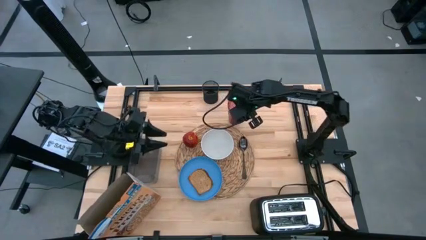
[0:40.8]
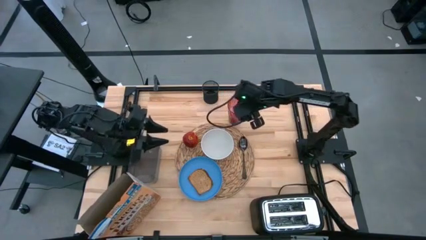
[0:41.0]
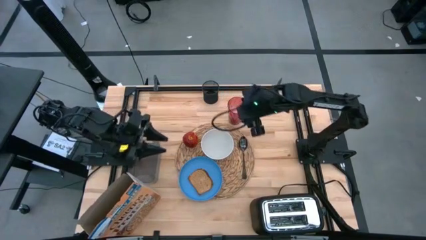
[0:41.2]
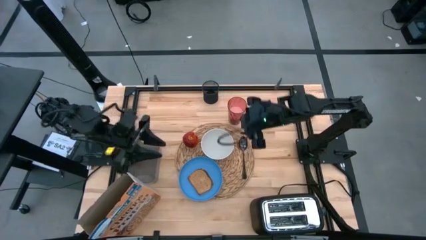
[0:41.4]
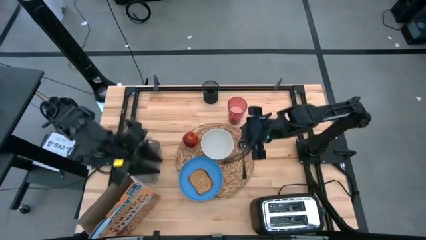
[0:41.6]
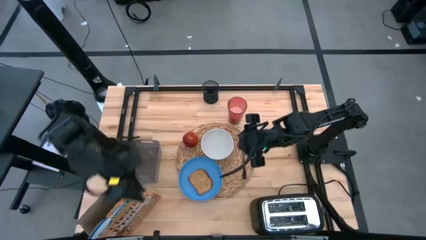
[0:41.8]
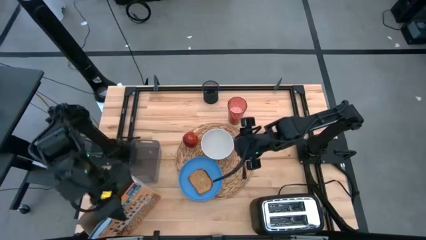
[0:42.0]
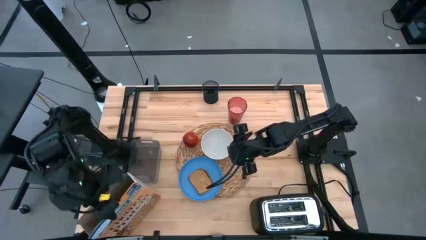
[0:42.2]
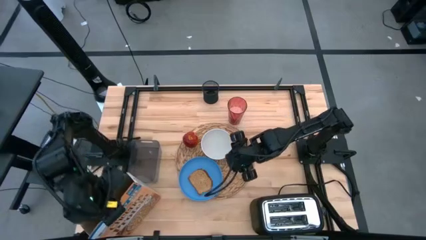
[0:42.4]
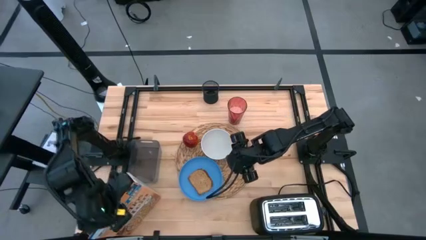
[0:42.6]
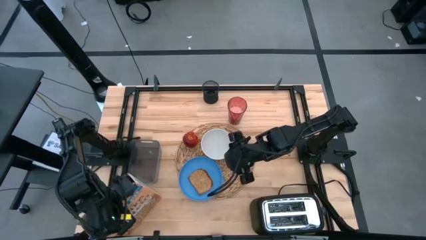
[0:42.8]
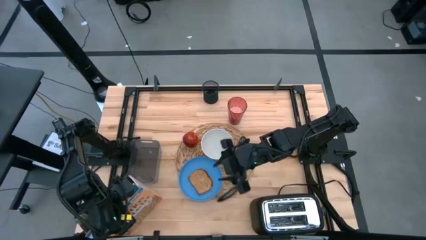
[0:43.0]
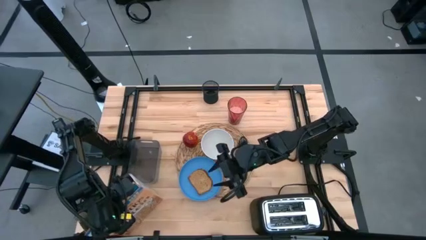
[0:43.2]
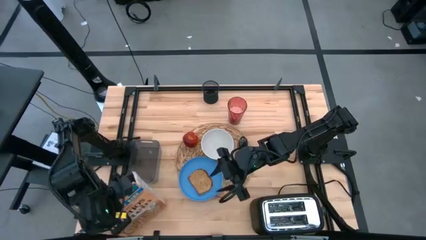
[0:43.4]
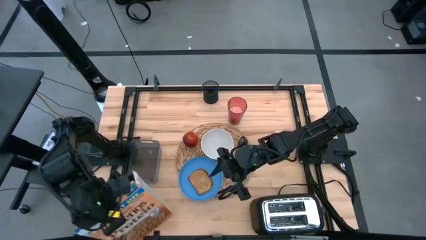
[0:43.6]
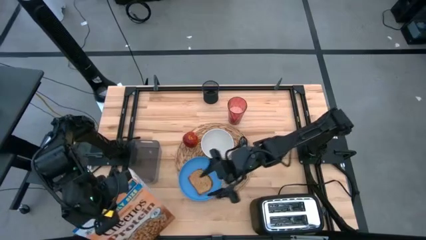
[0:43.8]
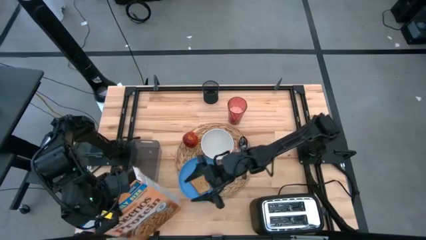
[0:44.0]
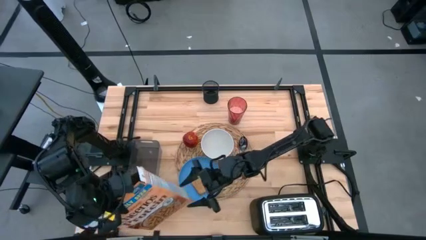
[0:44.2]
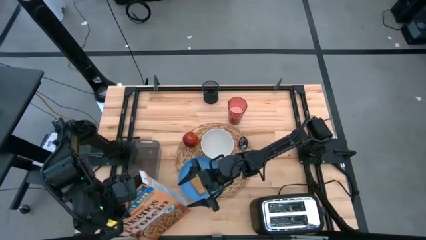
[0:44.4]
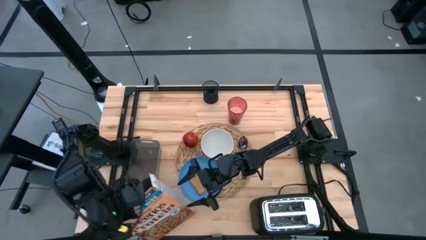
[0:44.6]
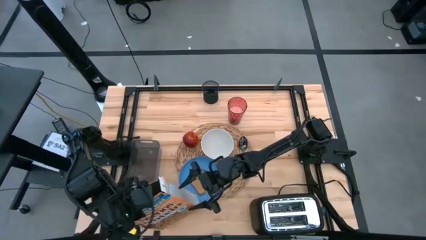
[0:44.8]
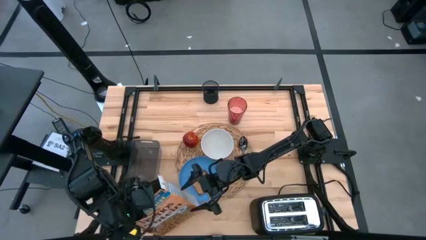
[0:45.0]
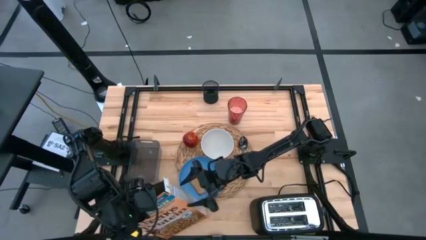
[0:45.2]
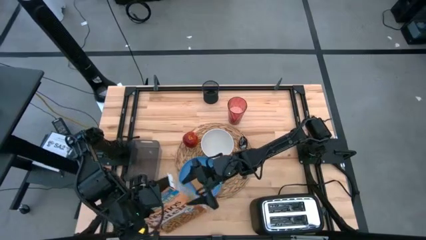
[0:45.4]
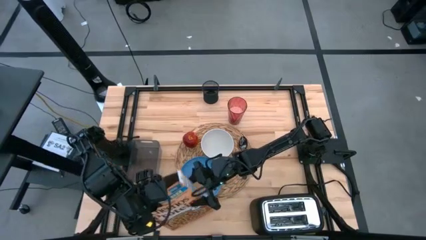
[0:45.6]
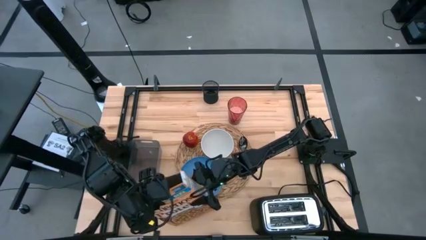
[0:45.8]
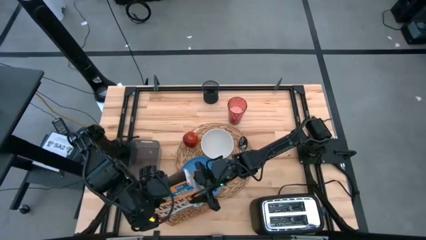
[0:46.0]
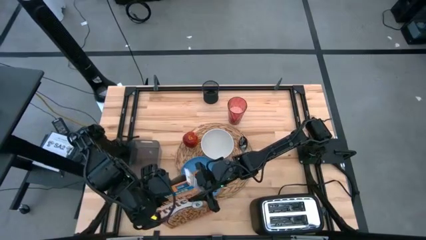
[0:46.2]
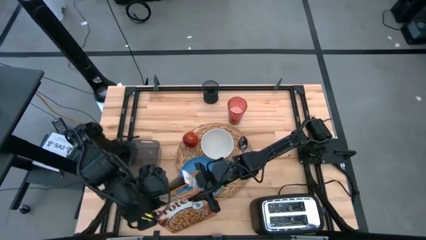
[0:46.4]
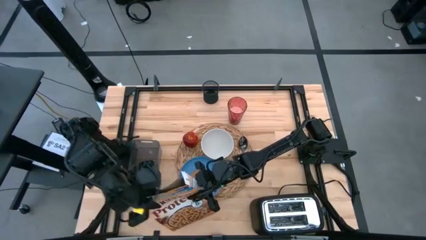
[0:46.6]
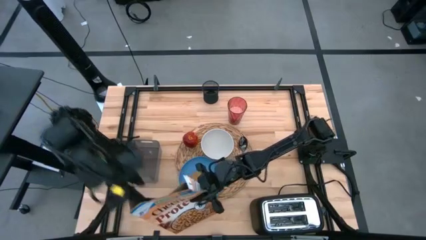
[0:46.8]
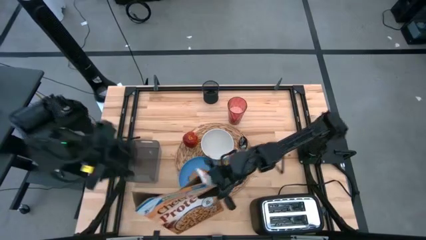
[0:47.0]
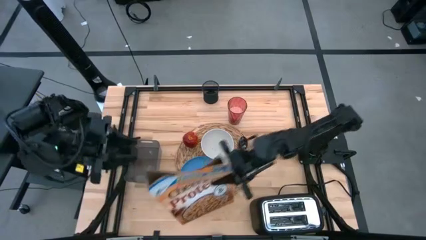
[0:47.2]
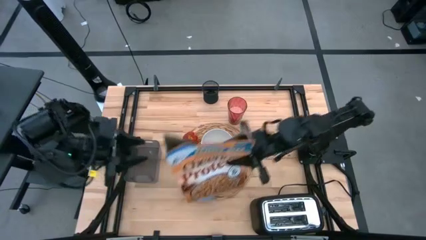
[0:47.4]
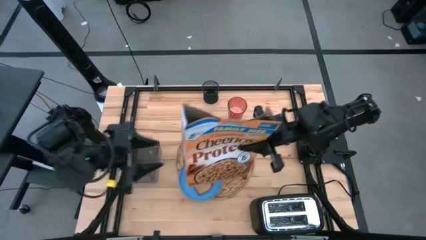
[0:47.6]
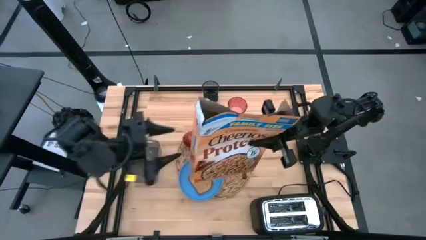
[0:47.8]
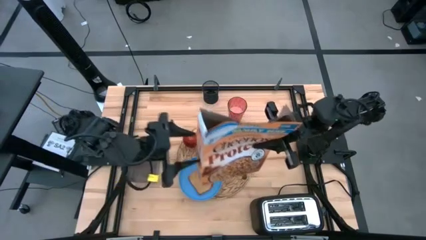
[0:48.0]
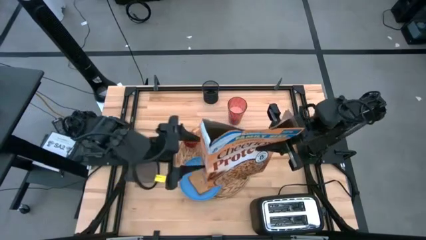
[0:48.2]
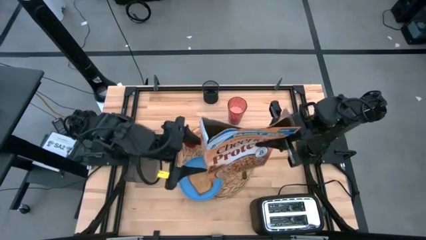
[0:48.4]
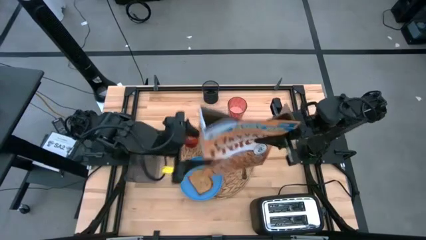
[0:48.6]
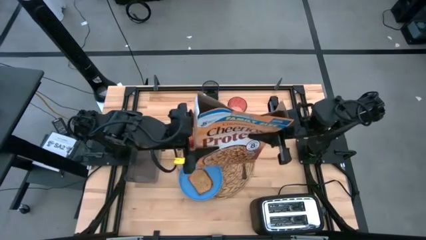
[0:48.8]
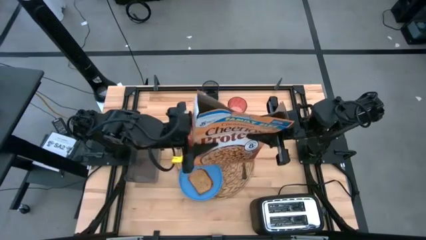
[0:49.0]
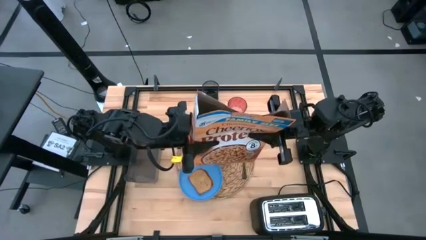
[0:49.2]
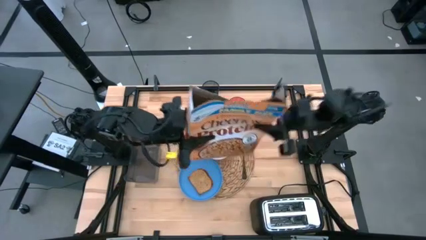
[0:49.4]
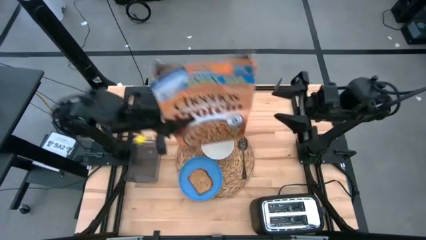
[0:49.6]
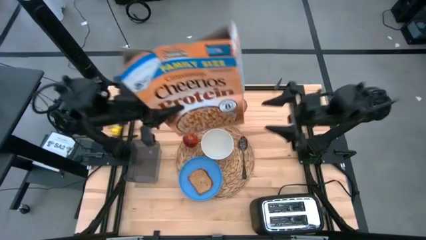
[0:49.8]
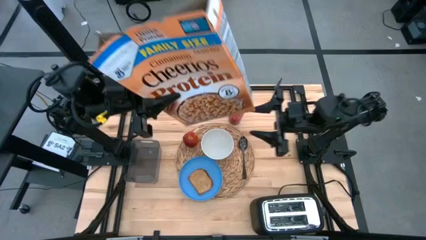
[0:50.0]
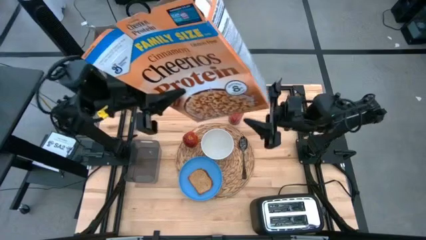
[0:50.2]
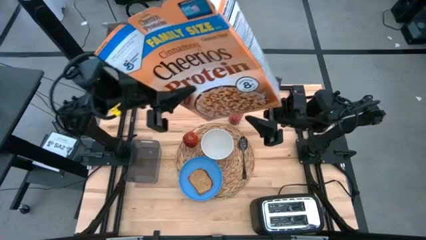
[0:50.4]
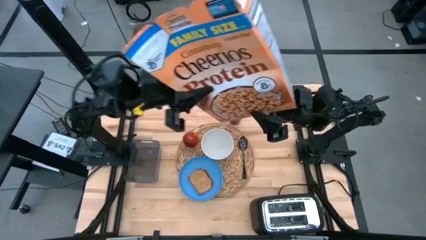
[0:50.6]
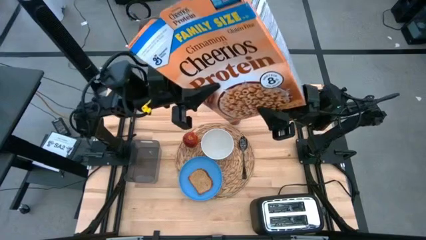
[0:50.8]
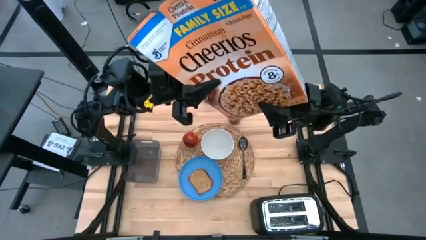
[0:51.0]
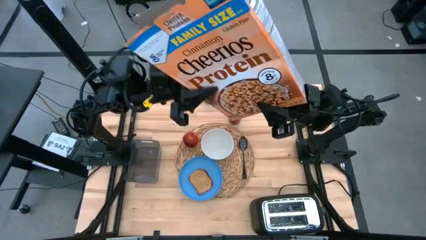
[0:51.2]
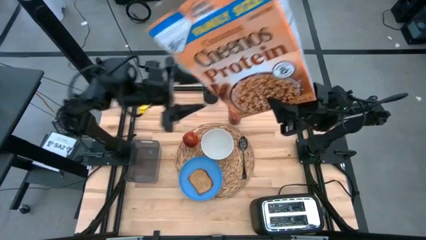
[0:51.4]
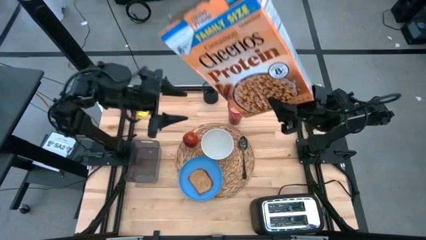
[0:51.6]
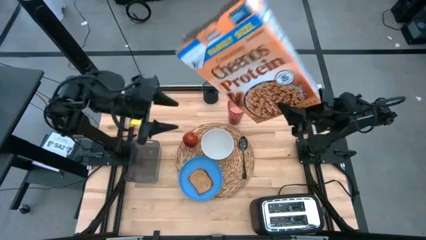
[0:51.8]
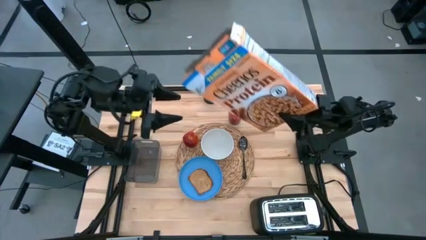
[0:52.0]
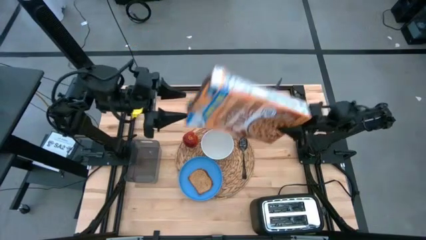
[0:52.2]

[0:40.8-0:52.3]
Task: Arrange a breakfast setting
Pour the cereal into the white bowl

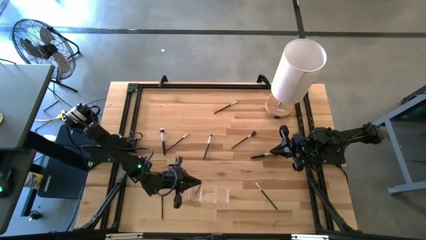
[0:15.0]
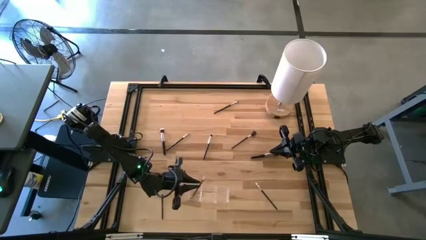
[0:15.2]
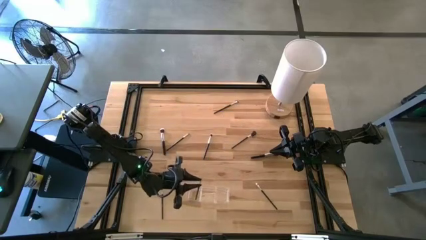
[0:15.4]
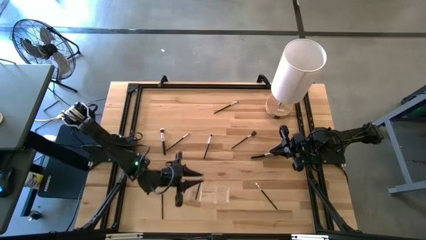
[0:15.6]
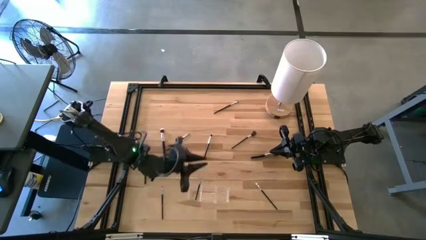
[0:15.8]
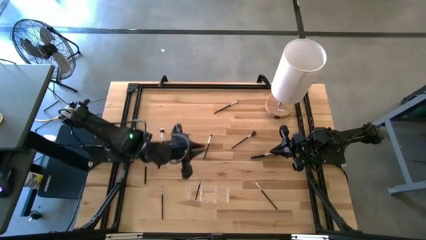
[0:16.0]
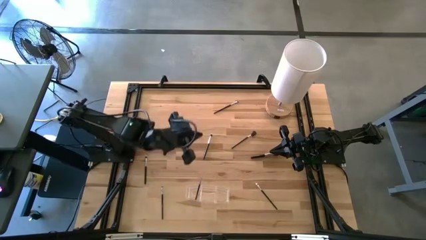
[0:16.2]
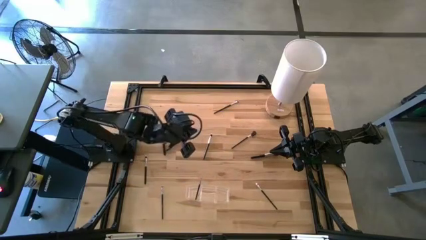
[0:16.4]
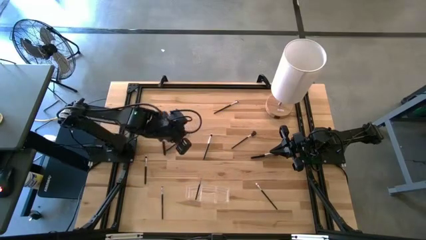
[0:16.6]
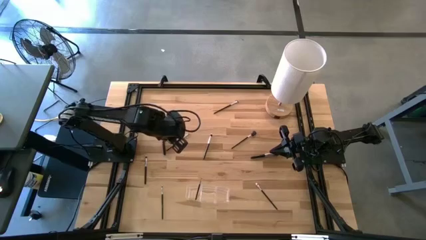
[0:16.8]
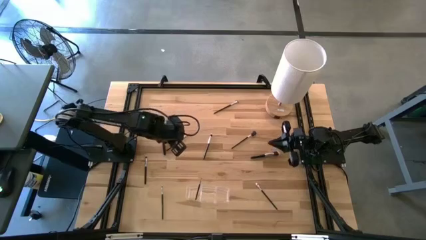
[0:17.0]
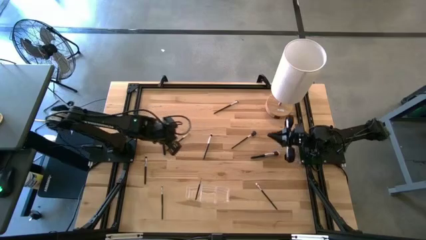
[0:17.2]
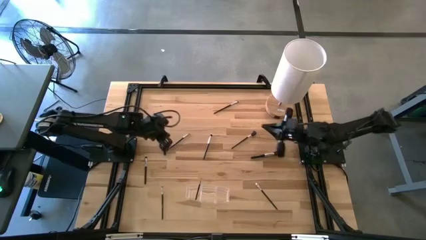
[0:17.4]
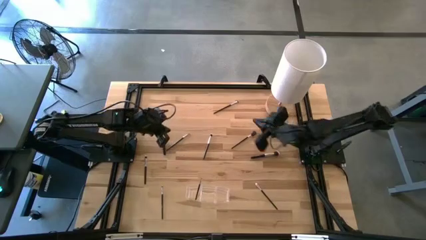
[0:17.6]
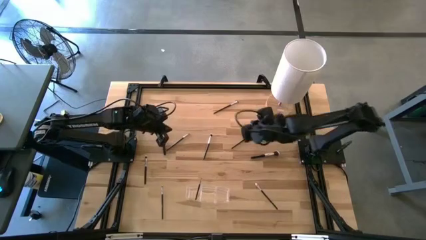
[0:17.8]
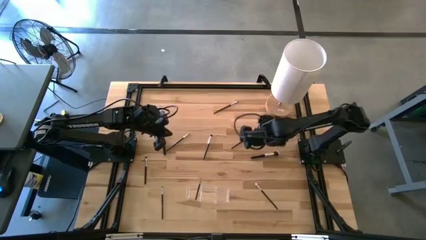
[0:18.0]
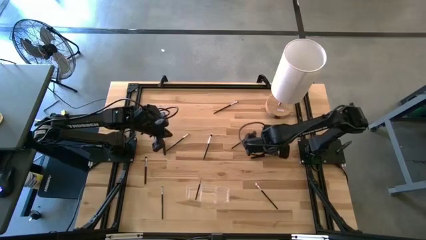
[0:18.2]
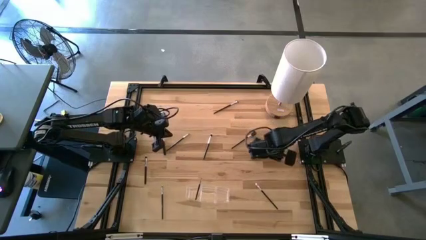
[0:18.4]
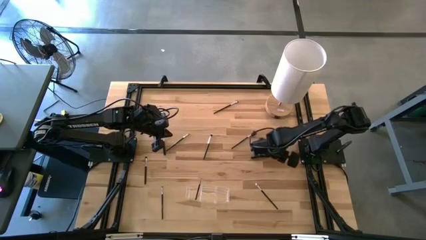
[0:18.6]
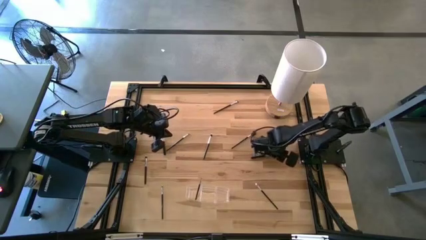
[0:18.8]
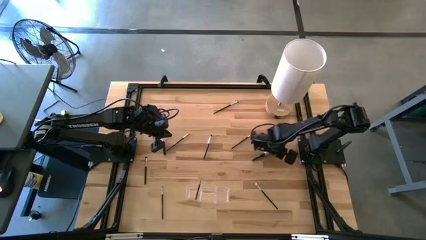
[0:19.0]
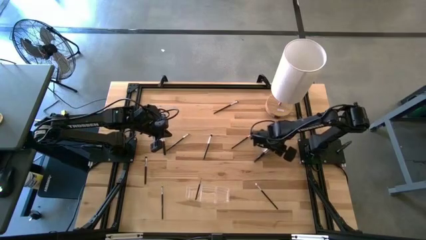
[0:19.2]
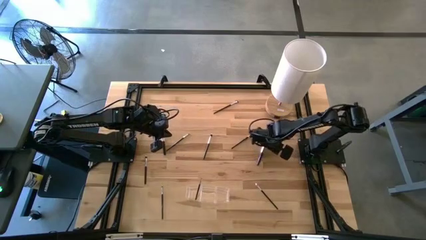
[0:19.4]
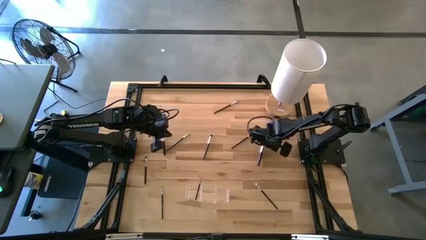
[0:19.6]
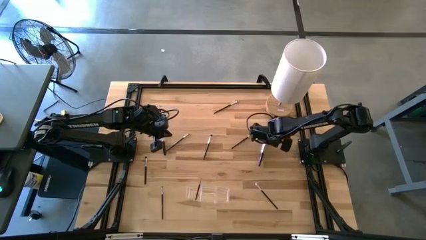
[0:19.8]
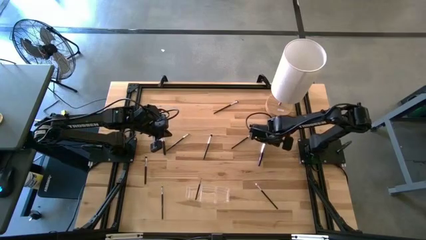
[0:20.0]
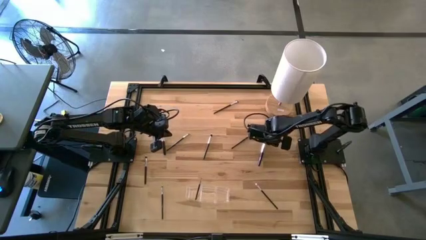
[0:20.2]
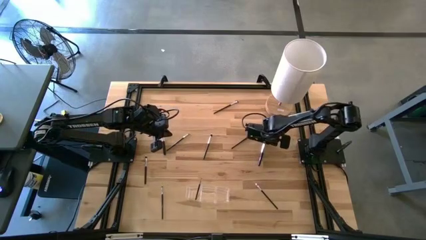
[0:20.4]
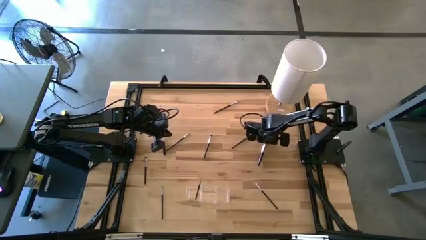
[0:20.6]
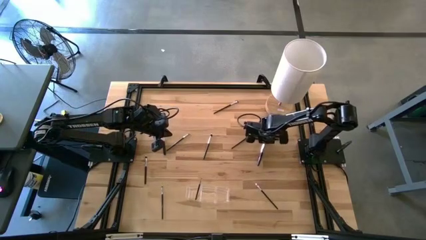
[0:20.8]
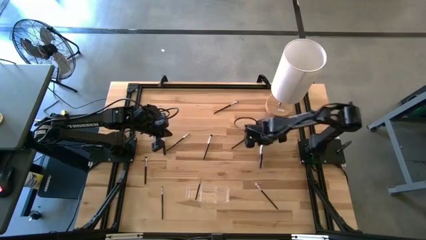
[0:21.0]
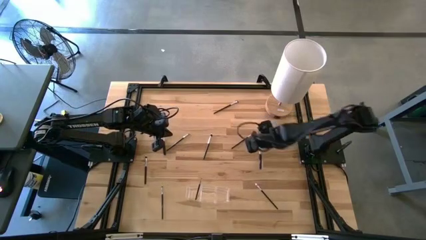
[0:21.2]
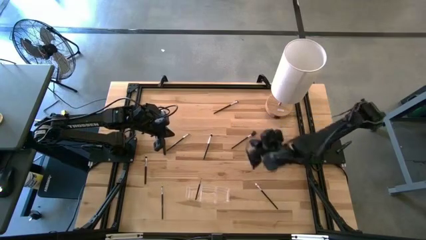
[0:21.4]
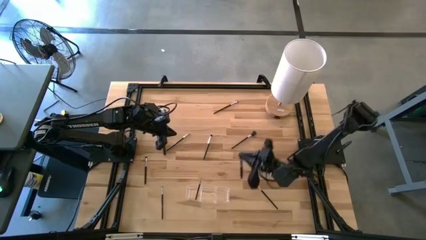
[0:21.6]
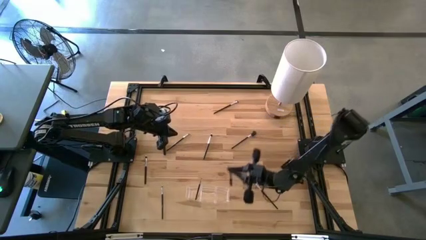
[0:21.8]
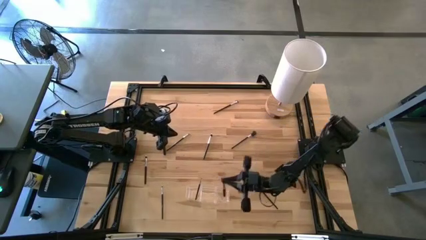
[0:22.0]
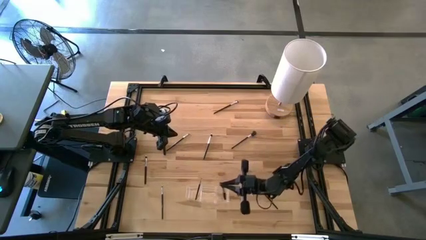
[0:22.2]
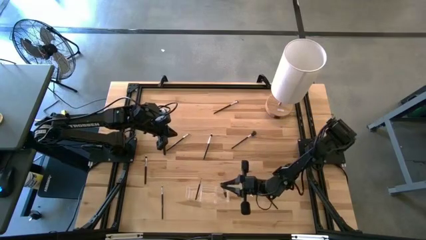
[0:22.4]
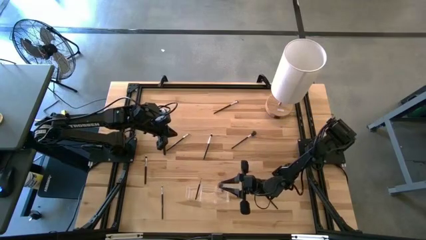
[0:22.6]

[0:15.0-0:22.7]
Task: Put items in baskets/containers
Put the black blush brush into the transparent organizer
